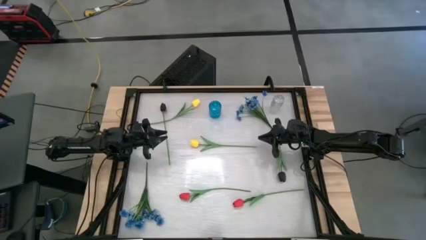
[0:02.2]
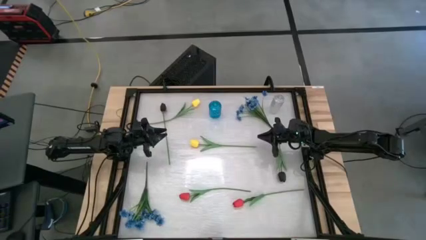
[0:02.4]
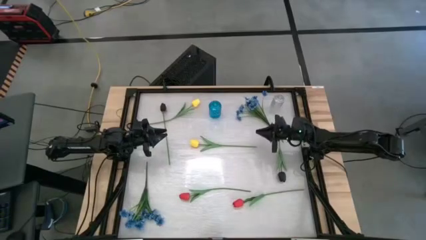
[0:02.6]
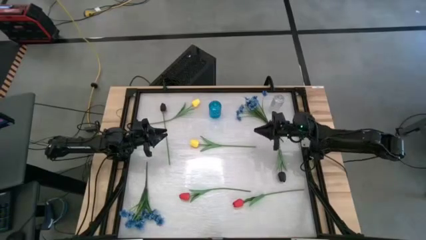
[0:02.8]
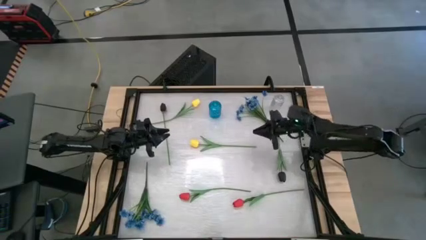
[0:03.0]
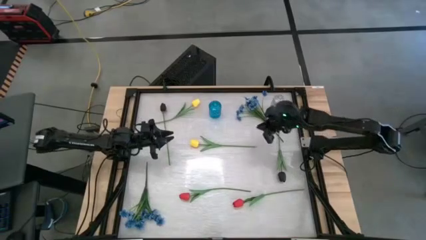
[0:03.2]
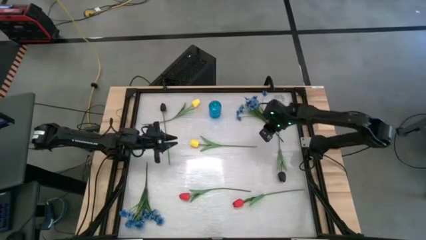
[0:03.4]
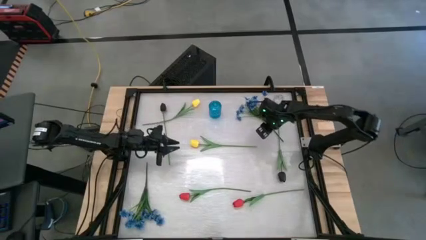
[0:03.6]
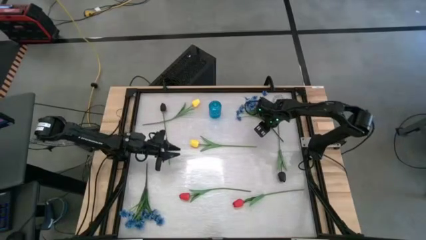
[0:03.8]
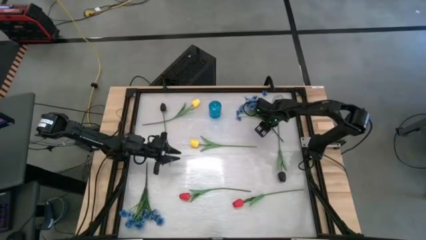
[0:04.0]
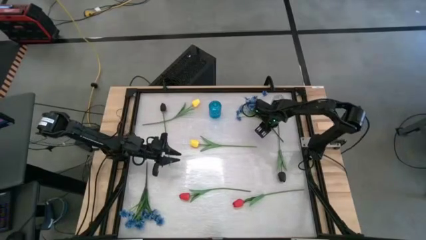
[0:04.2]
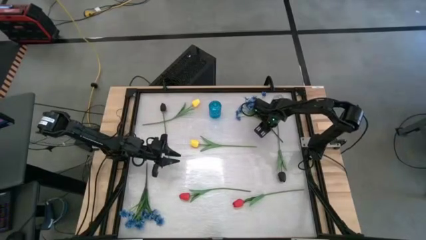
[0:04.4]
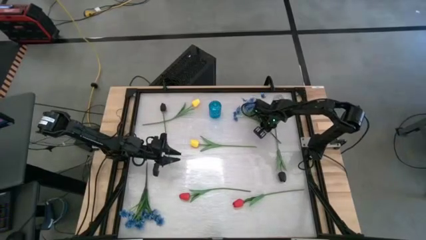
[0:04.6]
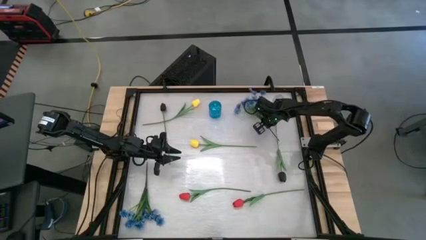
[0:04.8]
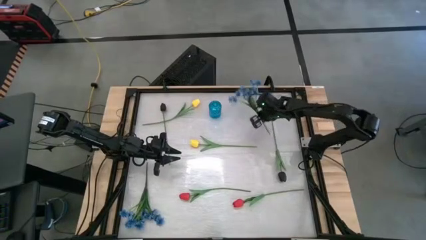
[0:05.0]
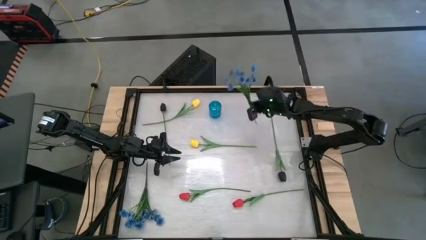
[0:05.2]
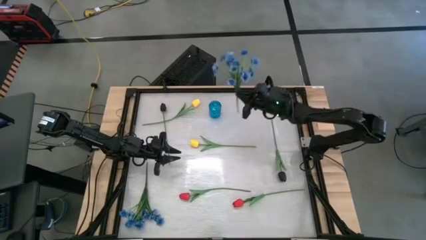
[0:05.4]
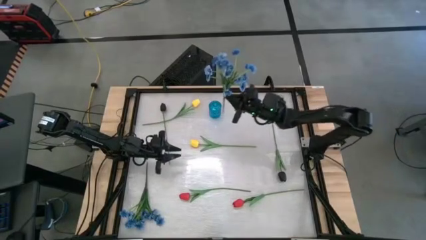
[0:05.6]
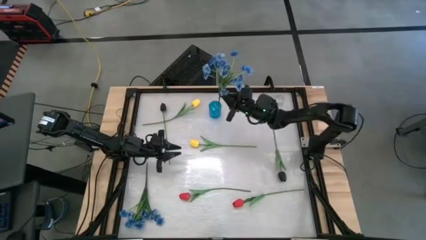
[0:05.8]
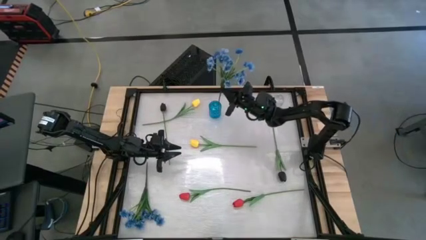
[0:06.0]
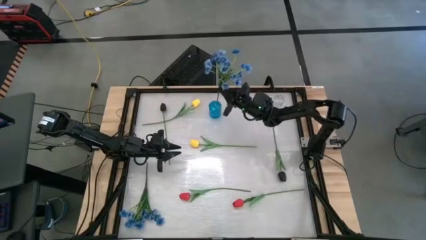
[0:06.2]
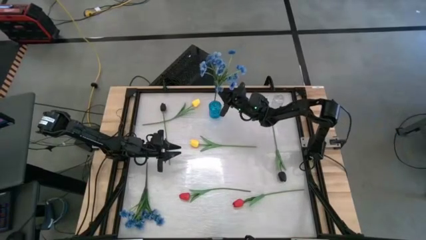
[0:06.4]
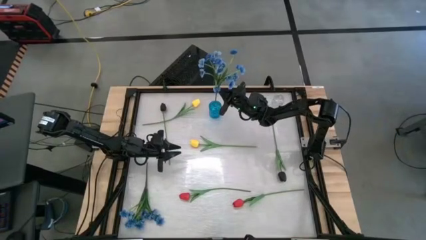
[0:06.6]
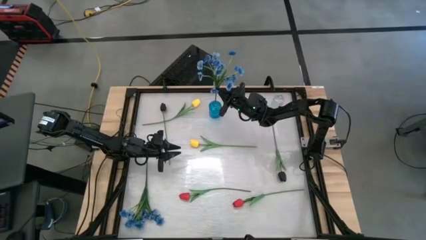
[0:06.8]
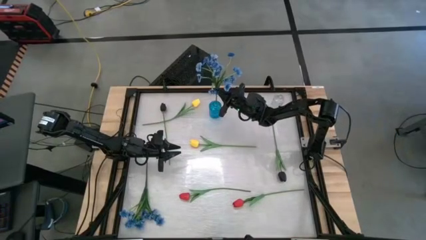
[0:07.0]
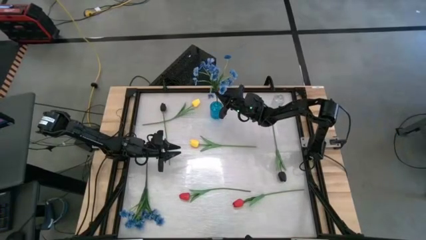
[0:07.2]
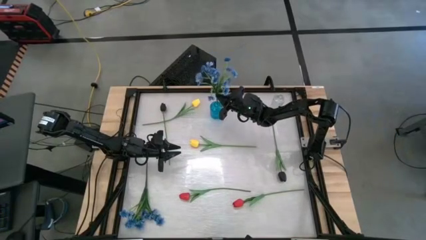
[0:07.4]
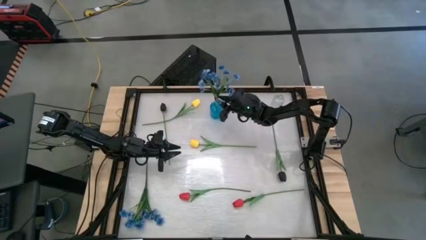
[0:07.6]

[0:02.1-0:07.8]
Task: Sort flowers into vase by color
Put the top blue flowers into the blue vase

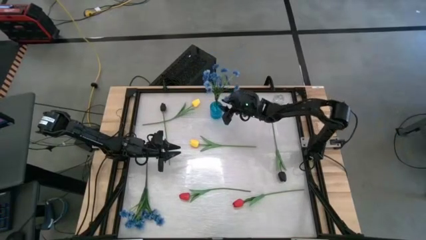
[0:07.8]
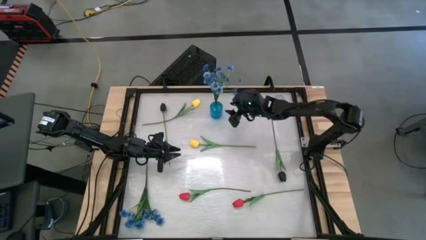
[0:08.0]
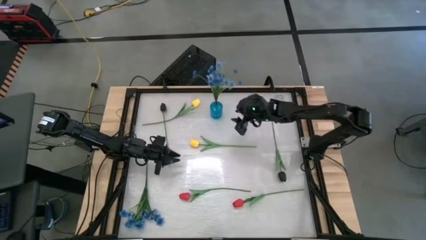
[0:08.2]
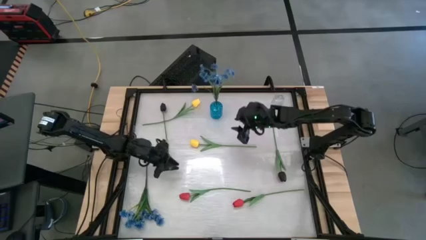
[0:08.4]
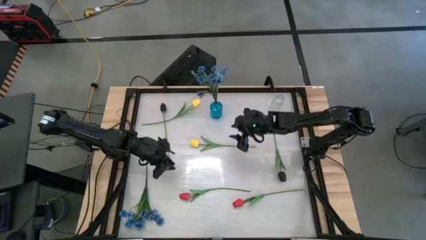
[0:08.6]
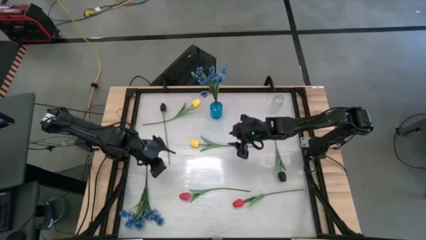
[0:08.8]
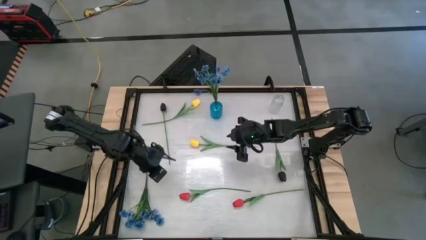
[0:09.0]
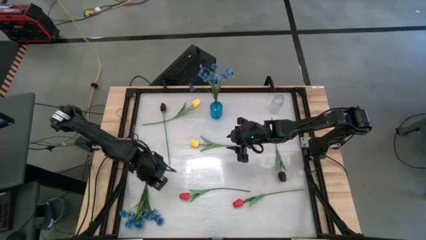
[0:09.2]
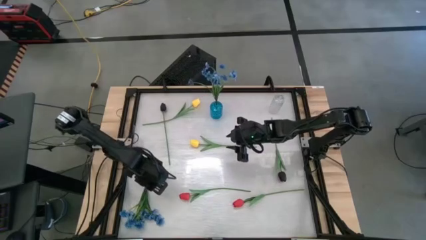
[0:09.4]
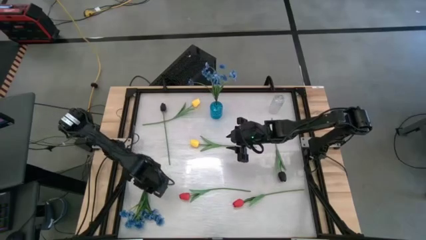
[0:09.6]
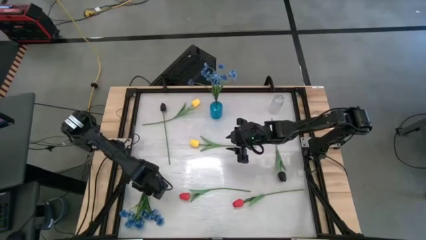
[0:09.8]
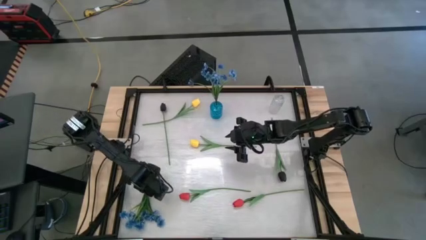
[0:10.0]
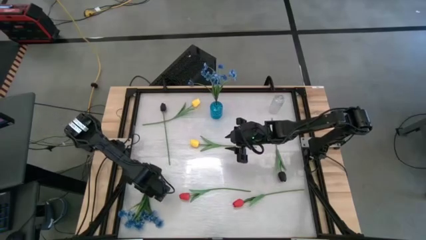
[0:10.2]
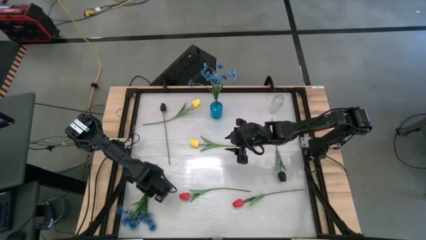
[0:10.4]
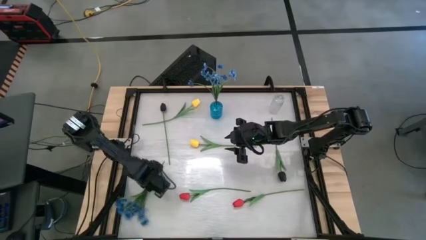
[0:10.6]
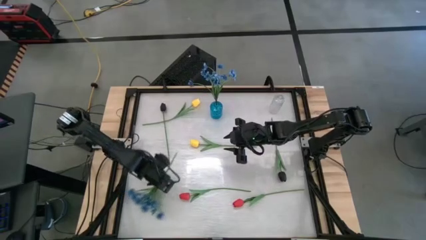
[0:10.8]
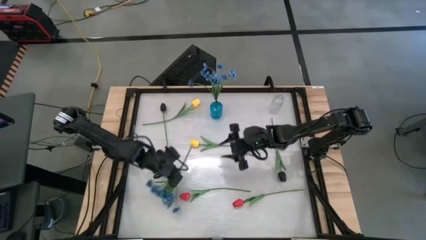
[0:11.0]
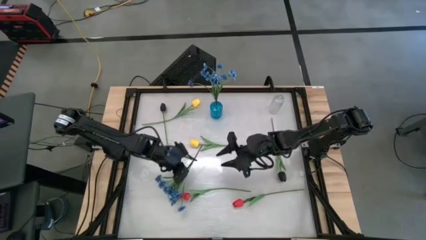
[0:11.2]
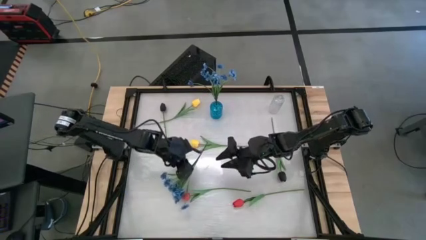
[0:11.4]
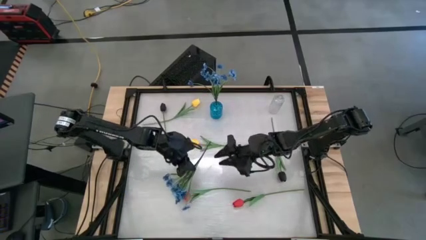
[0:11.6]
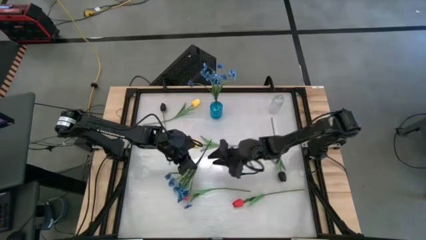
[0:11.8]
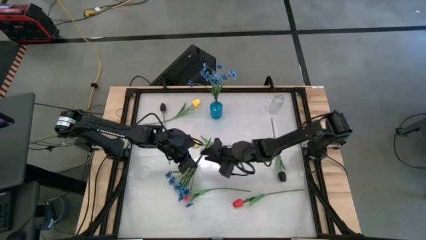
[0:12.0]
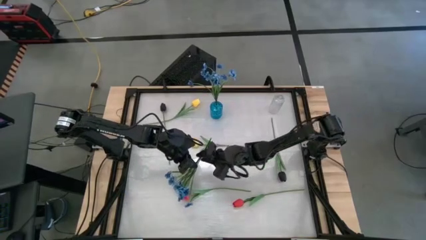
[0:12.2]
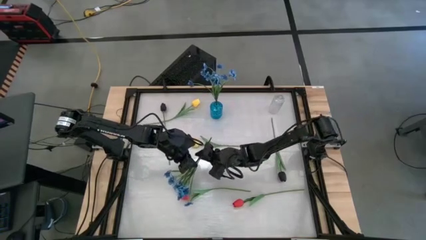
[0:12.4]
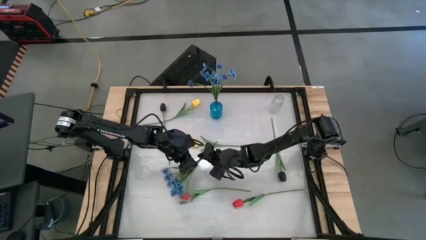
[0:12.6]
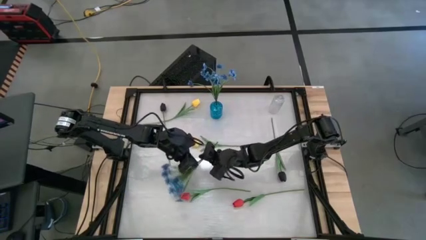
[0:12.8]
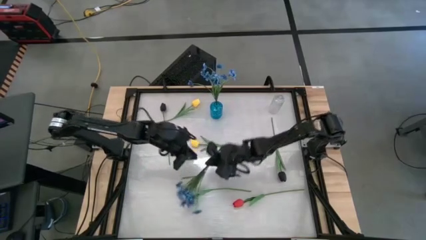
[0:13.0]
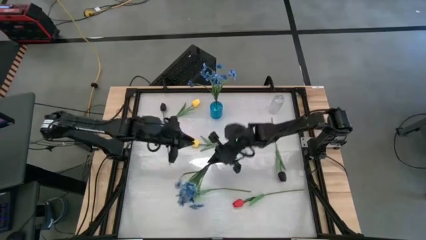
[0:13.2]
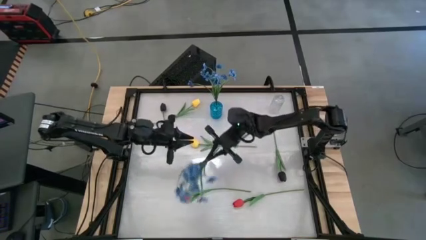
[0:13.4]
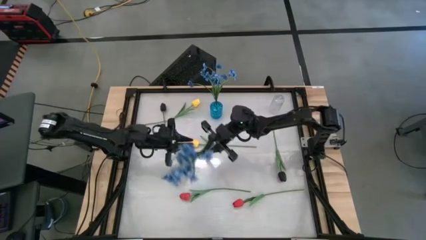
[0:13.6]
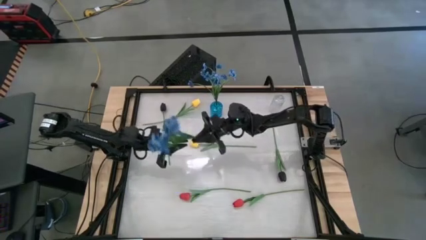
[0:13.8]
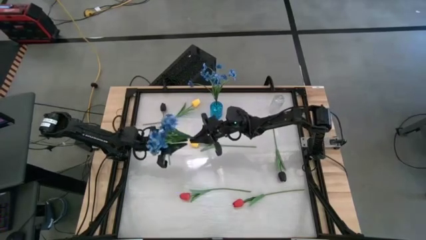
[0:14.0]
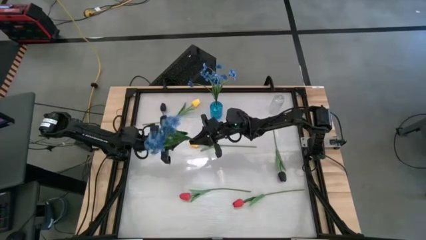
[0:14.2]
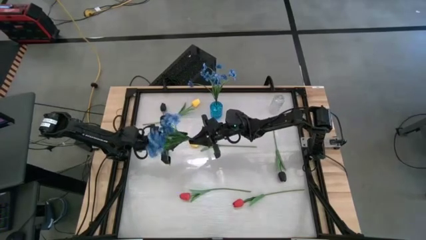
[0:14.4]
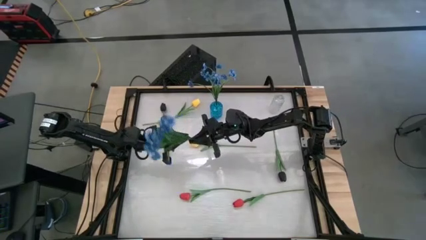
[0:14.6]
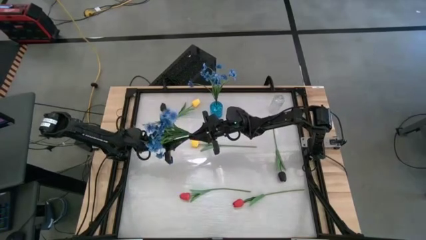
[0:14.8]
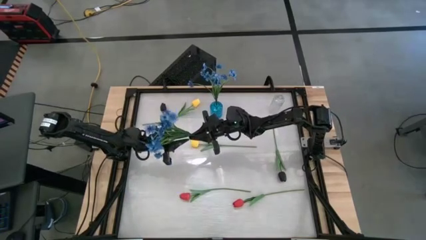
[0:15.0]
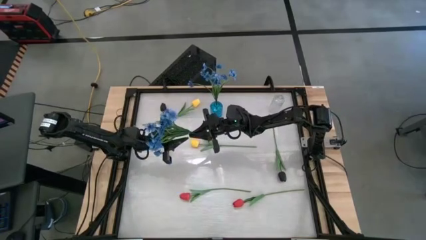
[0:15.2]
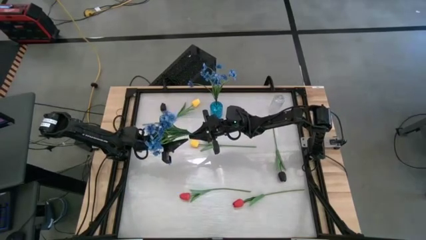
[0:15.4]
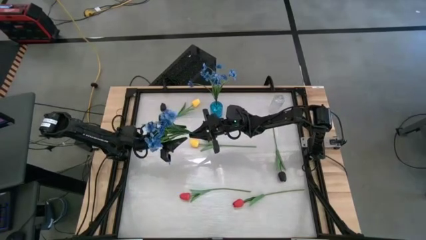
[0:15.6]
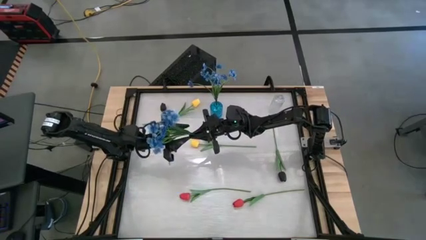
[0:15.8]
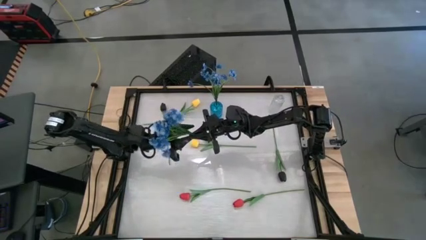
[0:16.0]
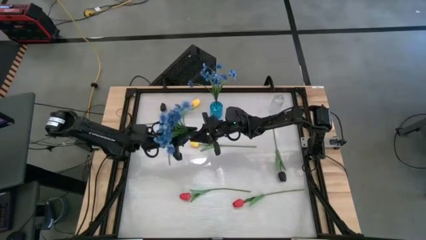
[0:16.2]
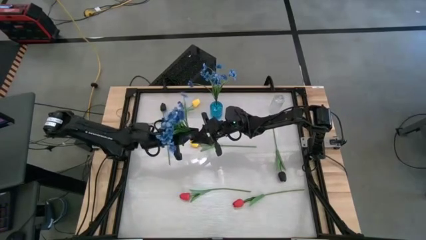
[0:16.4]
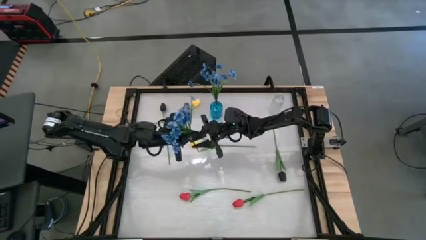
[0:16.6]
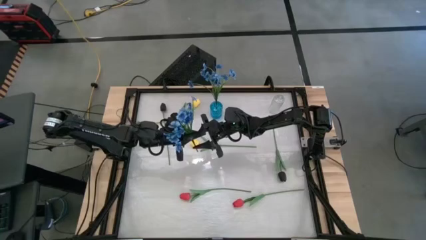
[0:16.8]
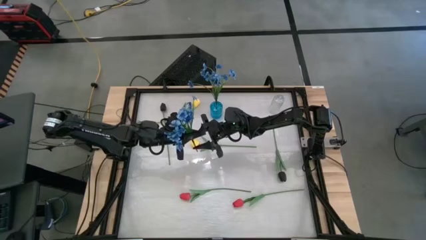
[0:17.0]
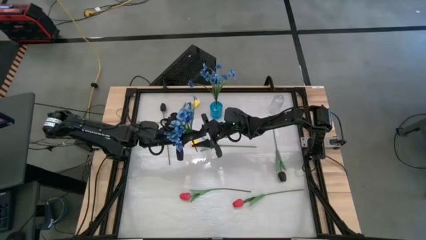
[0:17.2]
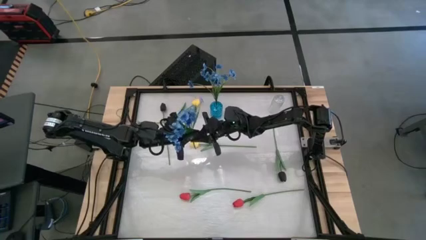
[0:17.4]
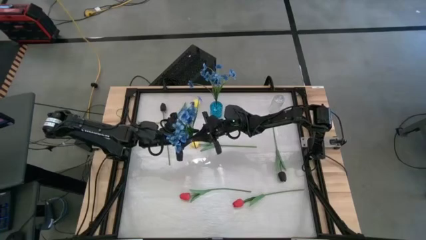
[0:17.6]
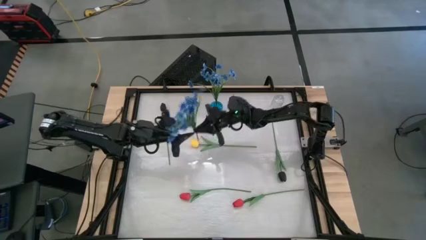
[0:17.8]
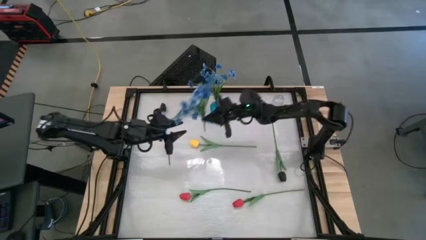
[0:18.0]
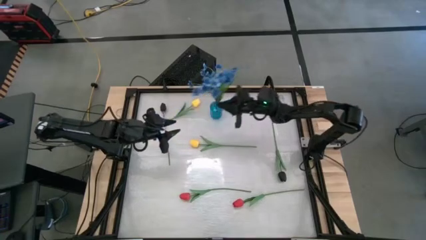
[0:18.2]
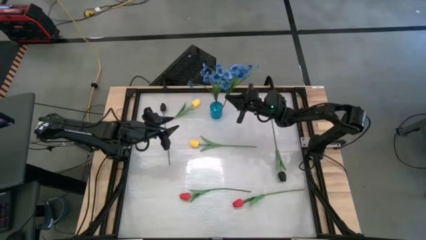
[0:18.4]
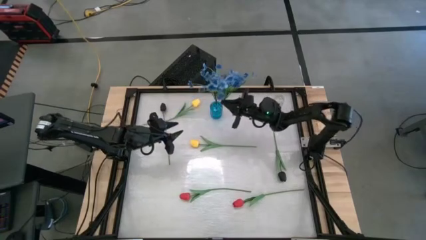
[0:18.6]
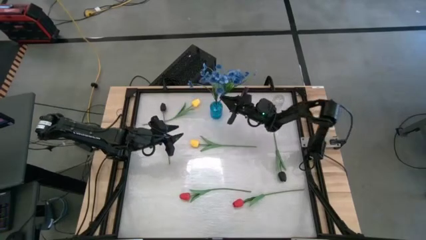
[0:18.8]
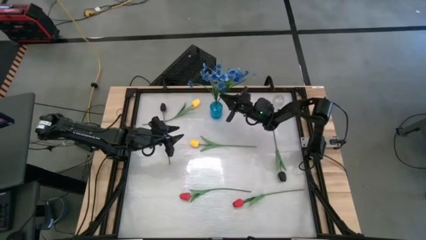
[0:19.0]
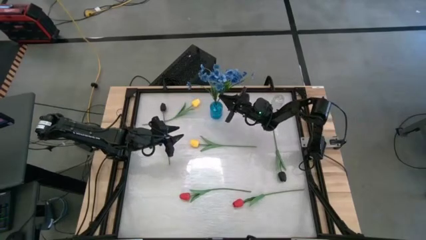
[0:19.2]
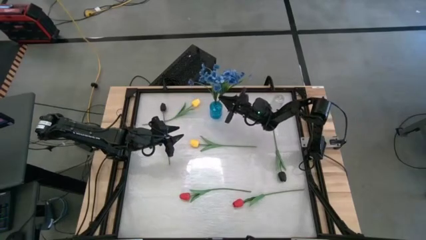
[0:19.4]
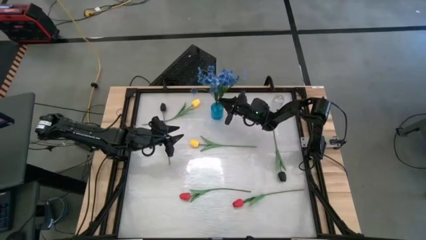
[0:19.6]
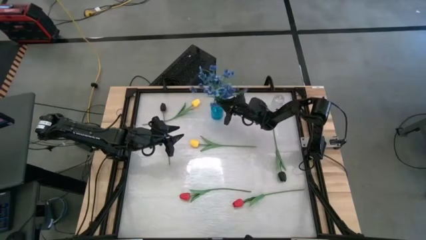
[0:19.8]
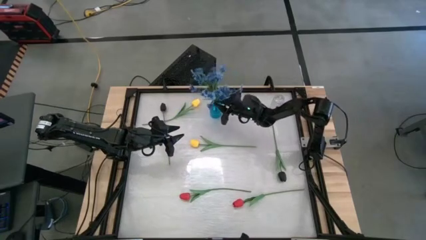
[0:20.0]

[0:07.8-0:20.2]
Put the blue flowers into the blue vase
